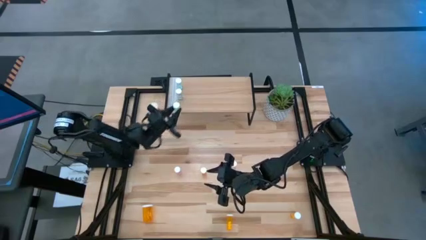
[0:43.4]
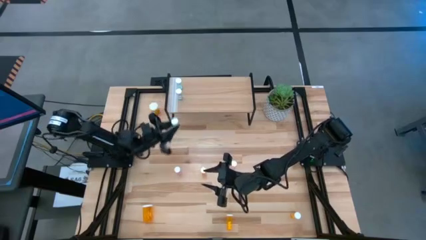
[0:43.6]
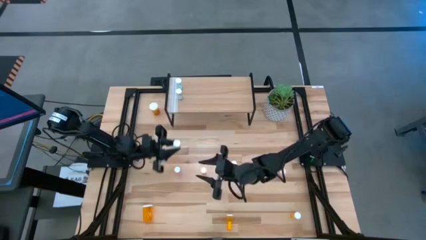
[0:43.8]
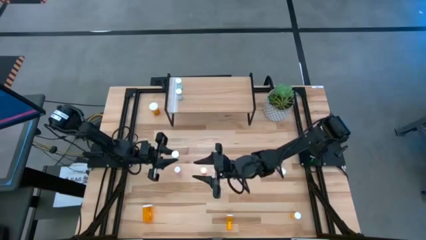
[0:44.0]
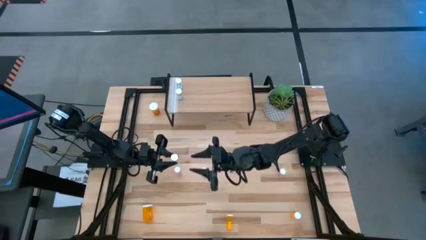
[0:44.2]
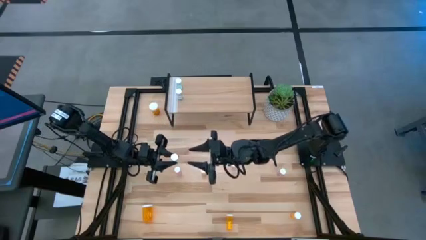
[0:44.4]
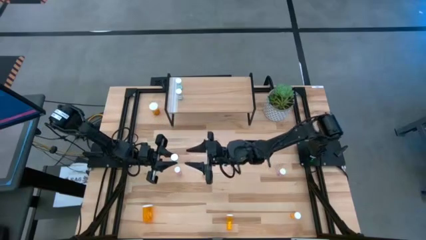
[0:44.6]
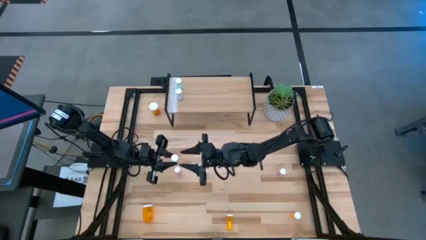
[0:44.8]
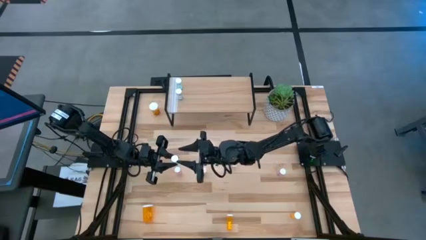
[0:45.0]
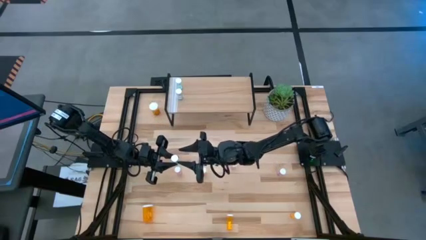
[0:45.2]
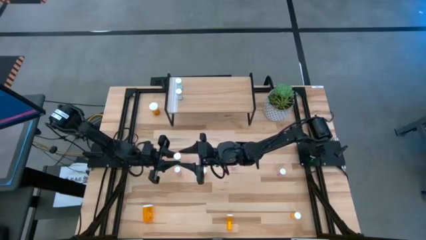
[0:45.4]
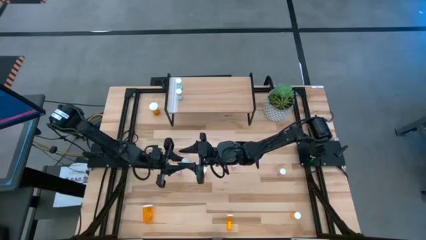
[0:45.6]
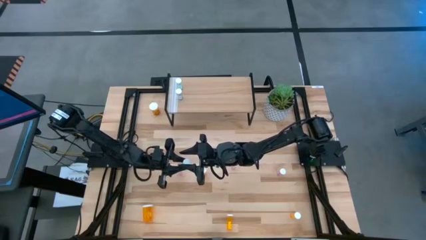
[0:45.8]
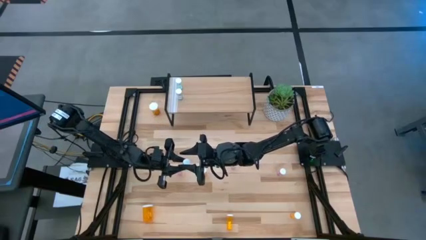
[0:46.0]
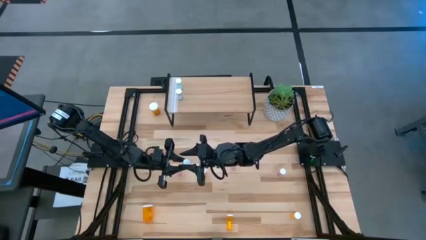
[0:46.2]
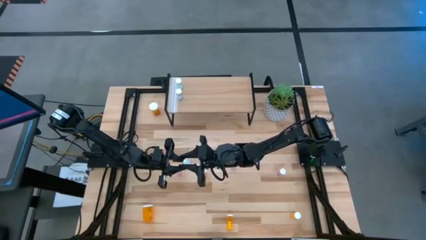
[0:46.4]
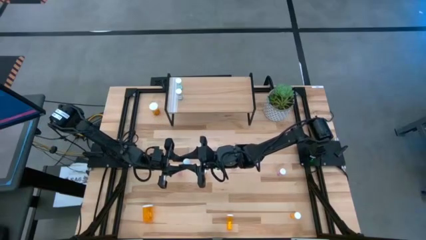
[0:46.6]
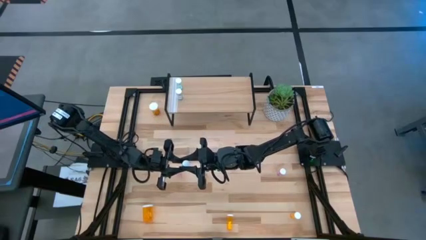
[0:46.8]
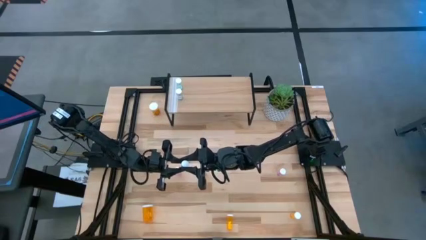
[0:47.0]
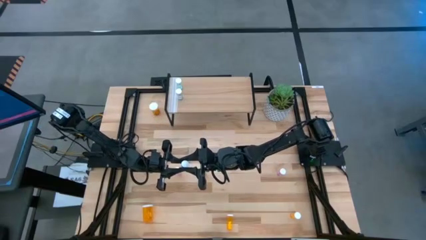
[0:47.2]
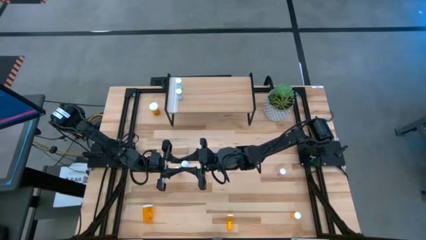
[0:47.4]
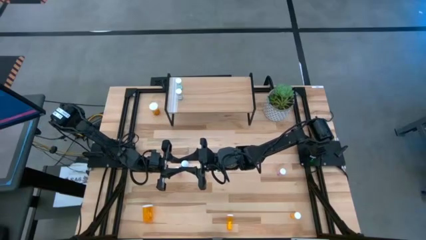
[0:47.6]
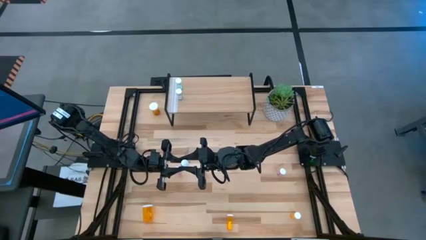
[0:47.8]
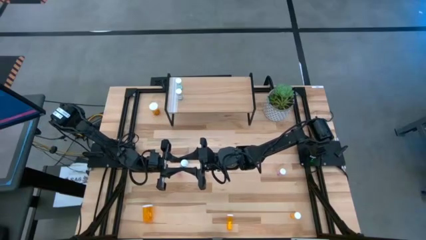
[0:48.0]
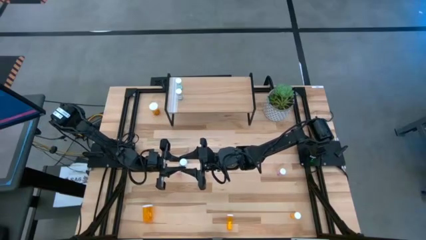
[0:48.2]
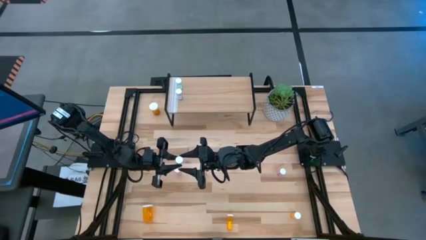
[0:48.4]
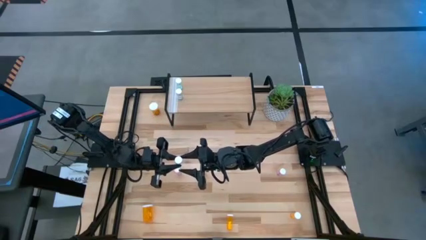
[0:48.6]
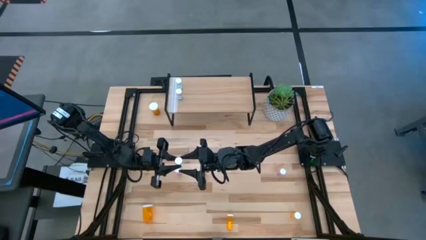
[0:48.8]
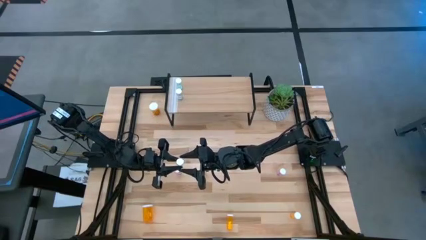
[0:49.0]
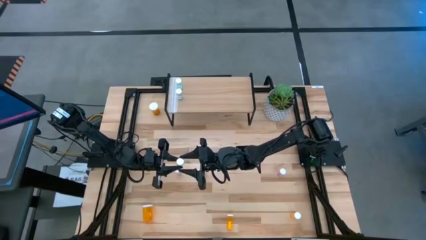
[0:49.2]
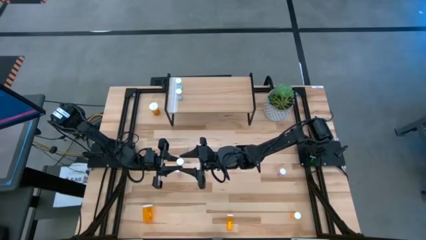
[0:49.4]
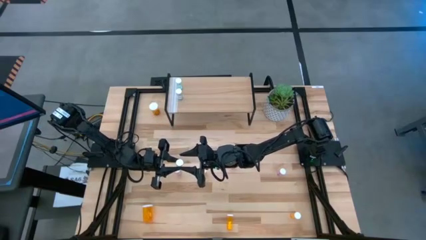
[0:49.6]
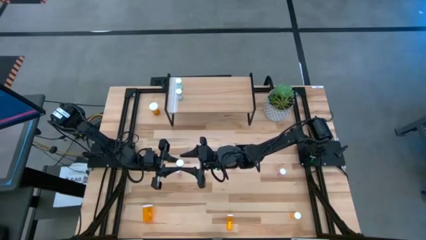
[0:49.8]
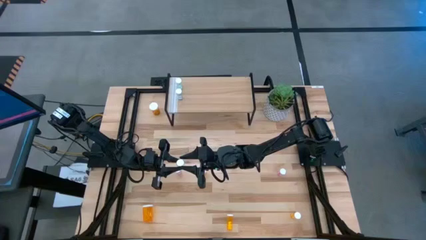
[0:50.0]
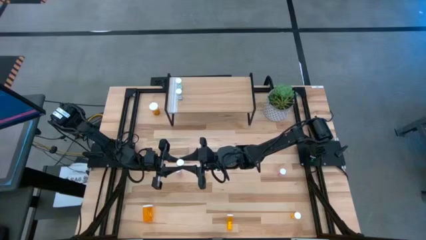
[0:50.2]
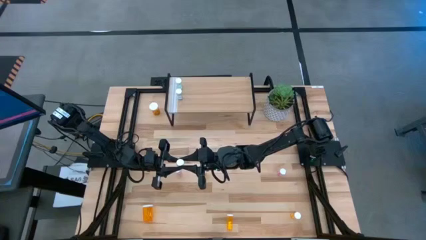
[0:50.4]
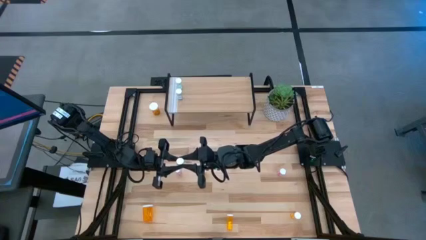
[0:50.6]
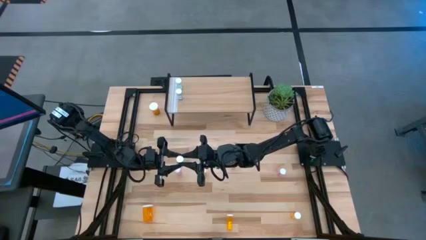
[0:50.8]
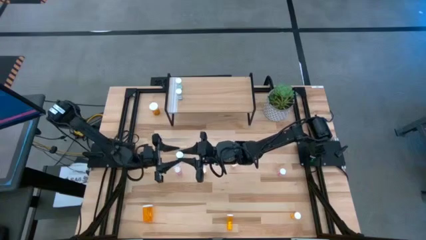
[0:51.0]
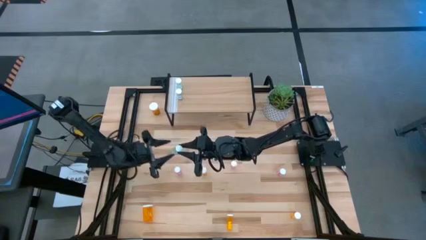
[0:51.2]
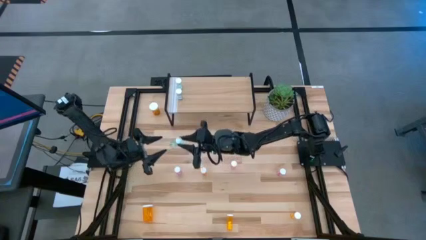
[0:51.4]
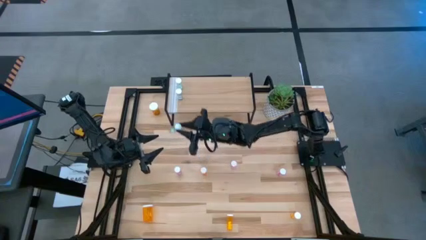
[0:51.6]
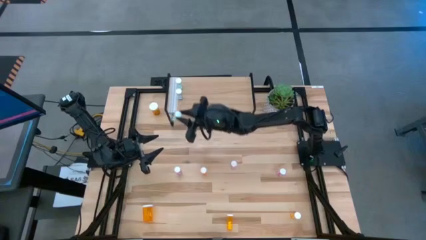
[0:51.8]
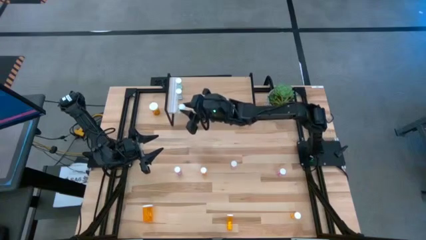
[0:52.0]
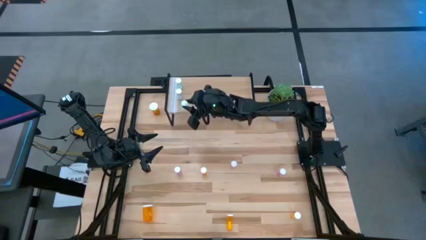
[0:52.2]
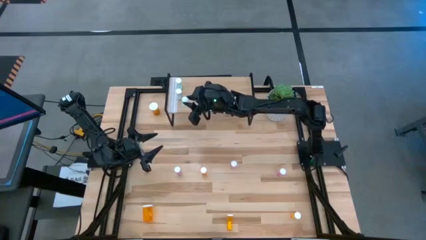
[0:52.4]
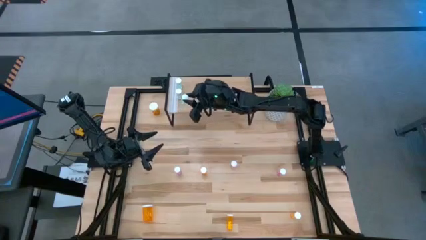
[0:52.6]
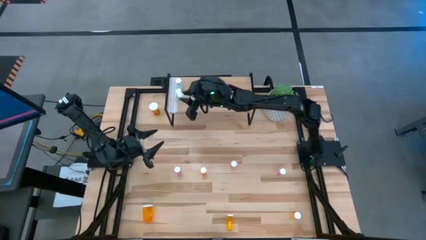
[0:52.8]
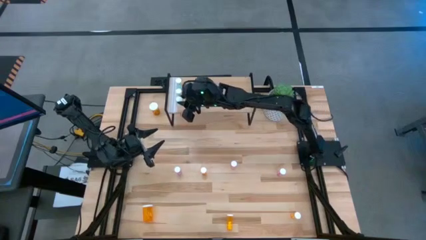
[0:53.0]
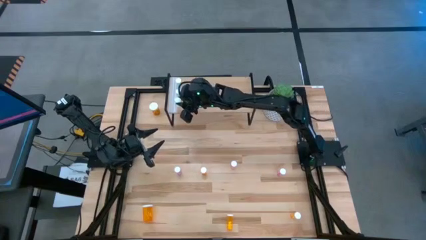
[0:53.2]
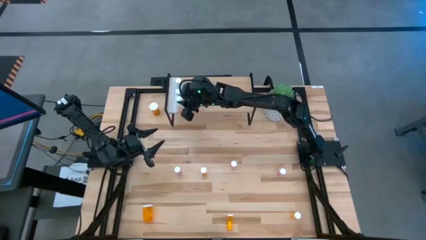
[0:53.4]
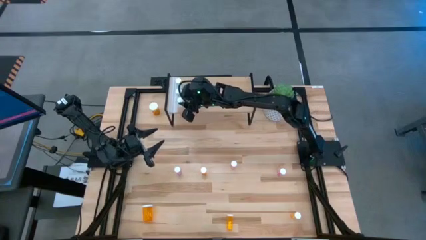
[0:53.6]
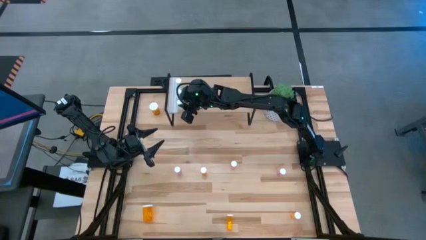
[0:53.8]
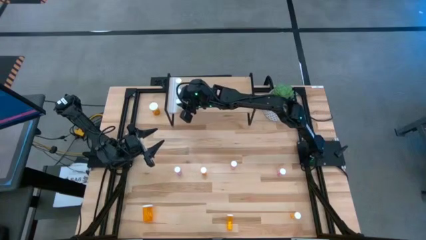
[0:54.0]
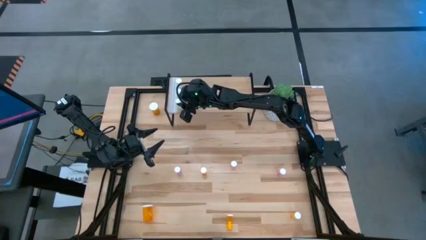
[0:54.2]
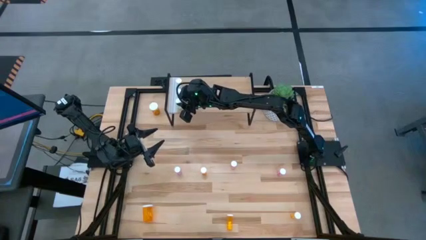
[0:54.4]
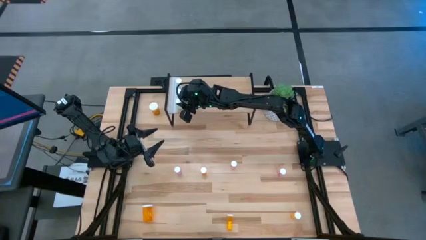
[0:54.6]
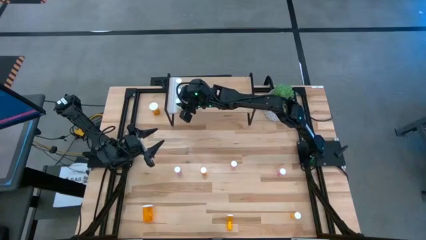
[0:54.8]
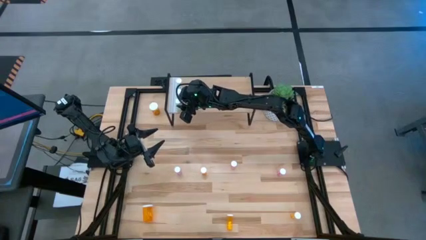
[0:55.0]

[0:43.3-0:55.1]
Task: Pick and place medicine bottles onto shelf by color
Put the blue pill bottle on the shelf aligned with the other blue pill bottles
